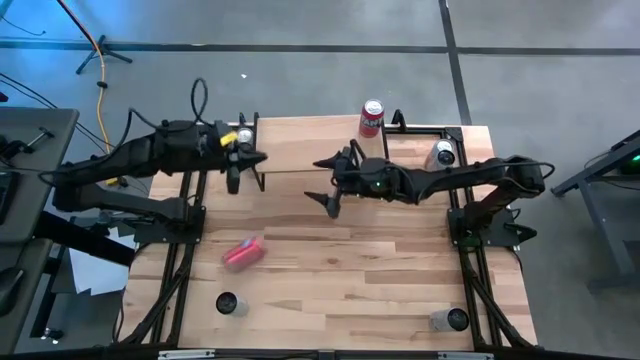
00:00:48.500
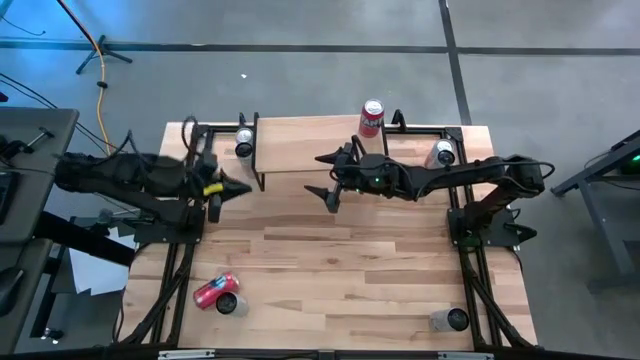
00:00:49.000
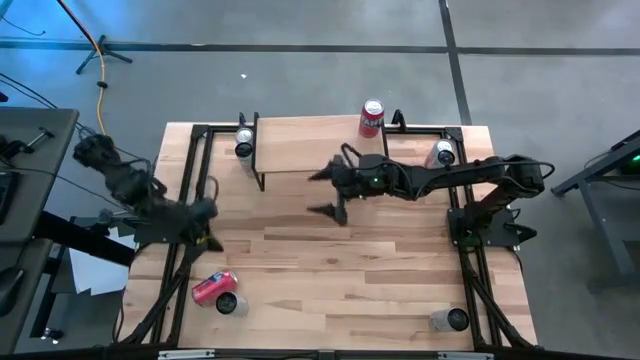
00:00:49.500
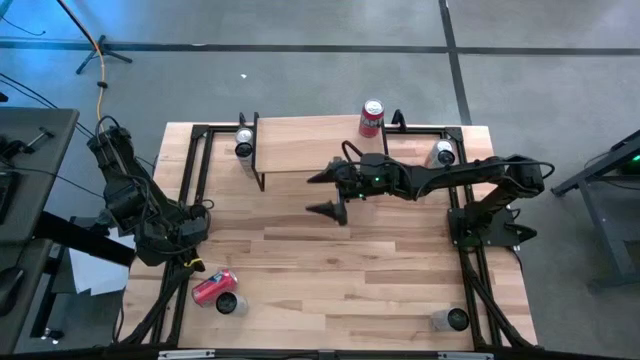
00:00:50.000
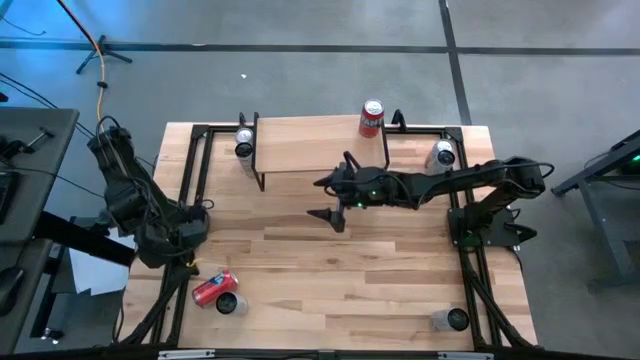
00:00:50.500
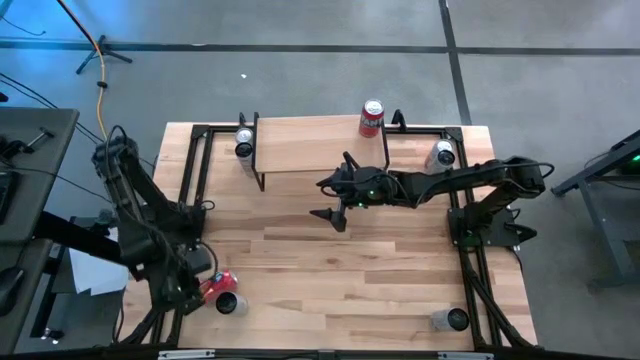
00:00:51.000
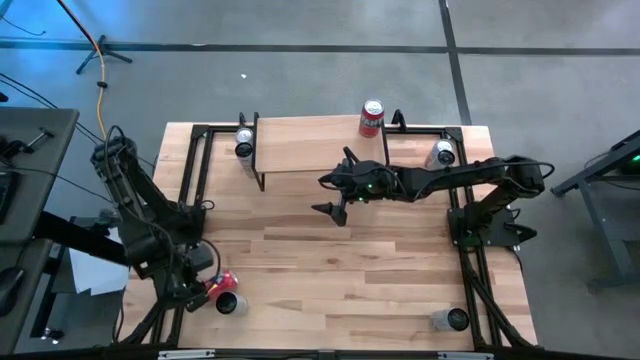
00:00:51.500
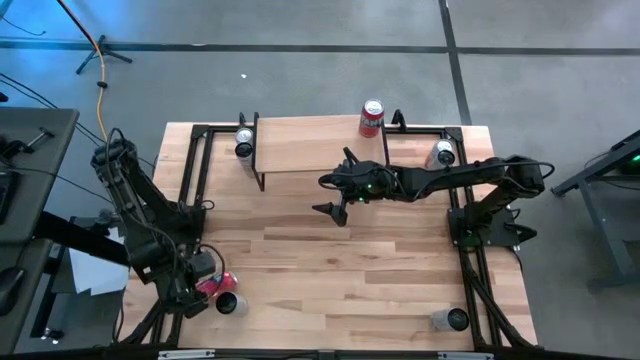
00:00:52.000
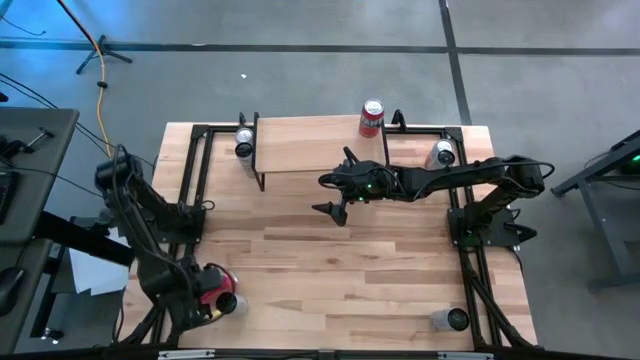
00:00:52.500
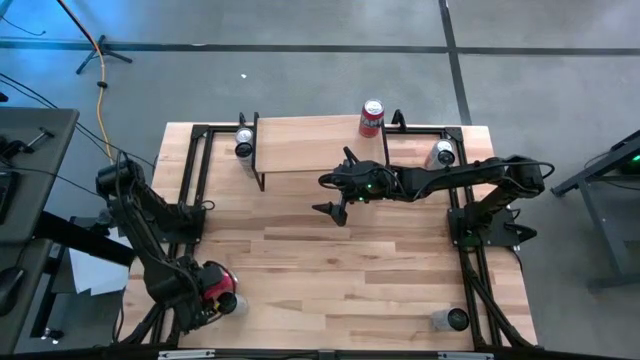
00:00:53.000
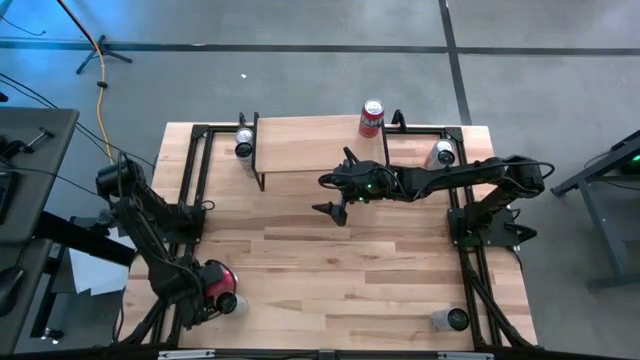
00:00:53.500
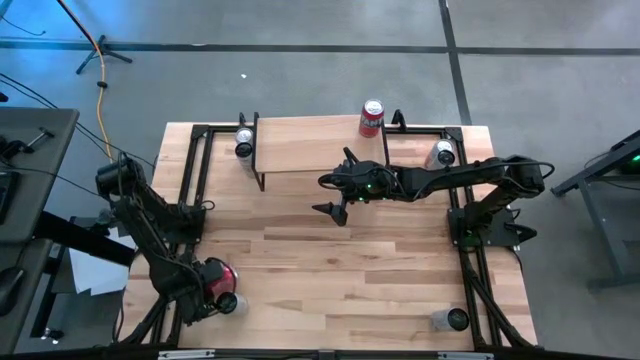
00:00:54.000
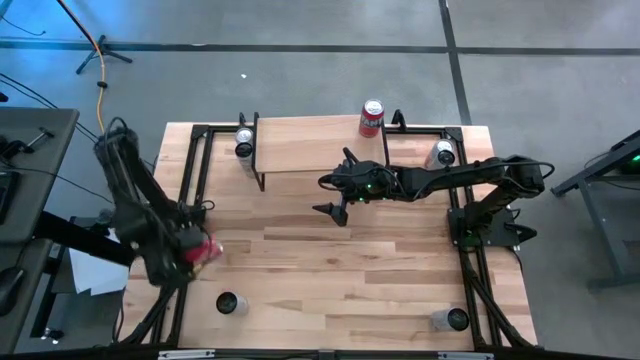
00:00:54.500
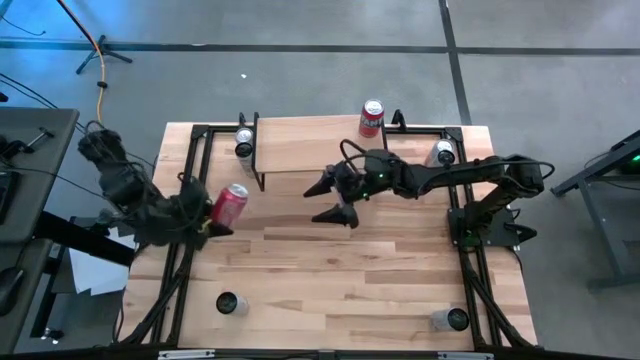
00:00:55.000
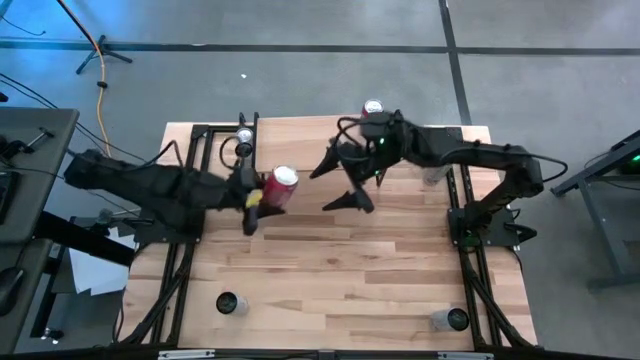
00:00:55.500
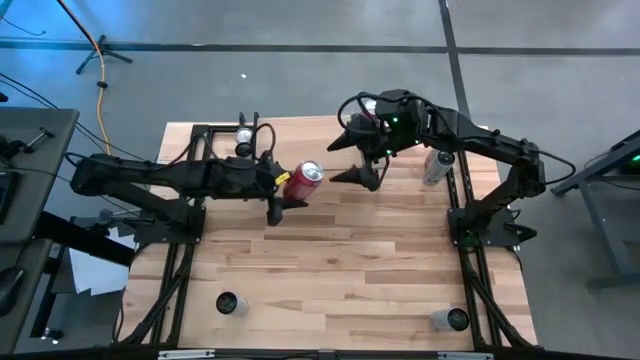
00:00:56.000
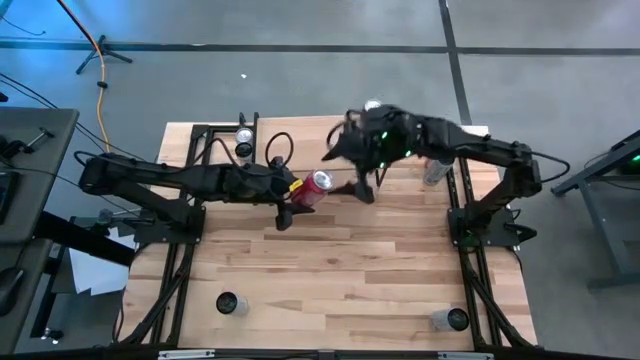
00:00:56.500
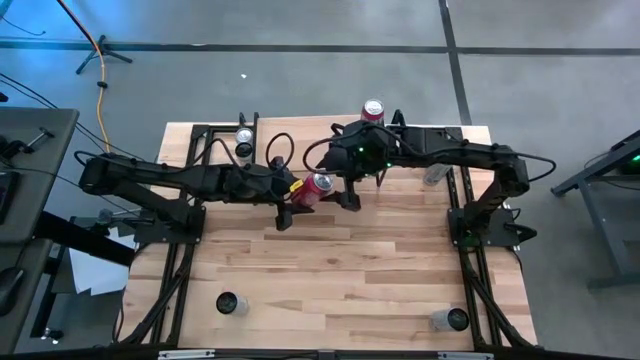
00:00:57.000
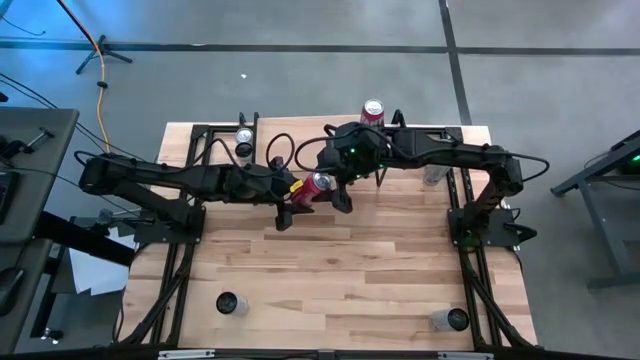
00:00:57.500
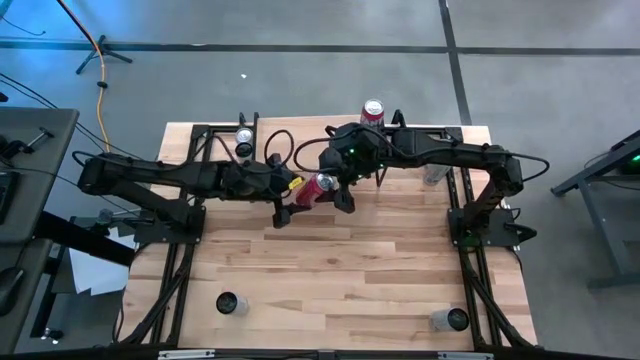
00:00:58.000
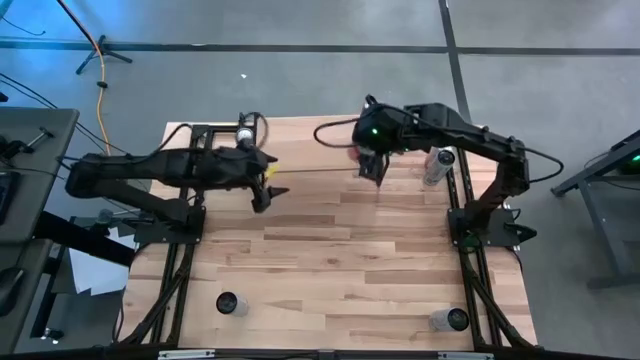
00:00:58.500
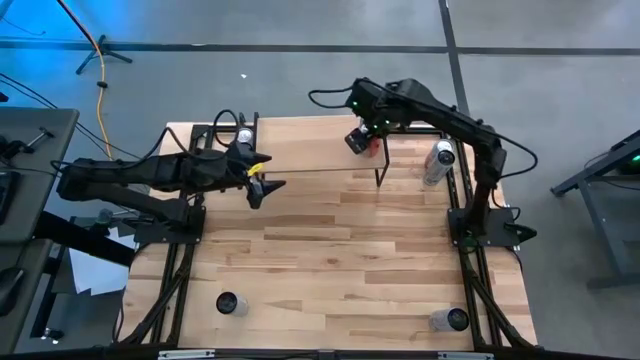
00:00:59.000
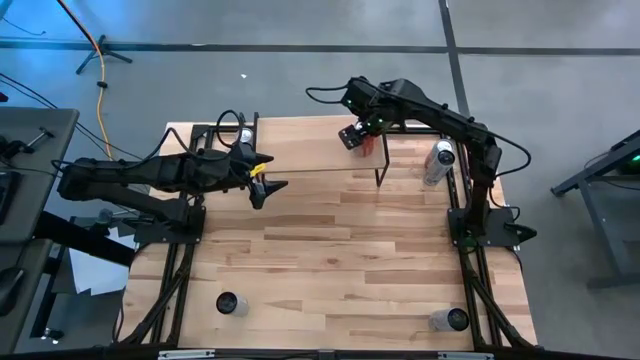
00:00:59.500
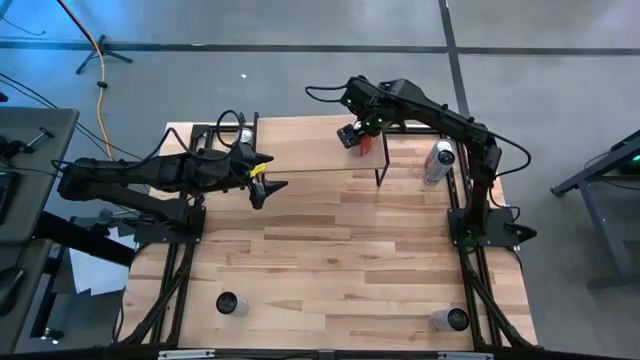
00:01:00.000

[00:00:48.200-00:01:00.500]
Task: Place canned beverage on shelf
Put the orange soda can on the shelf

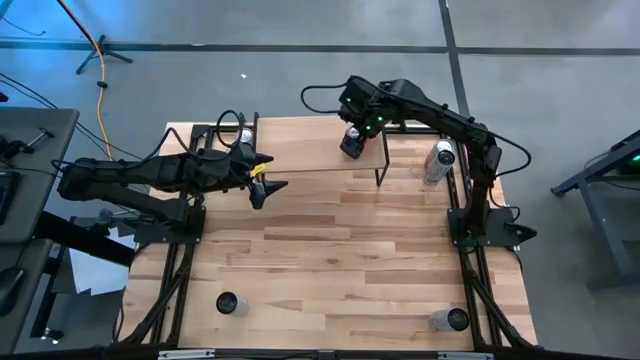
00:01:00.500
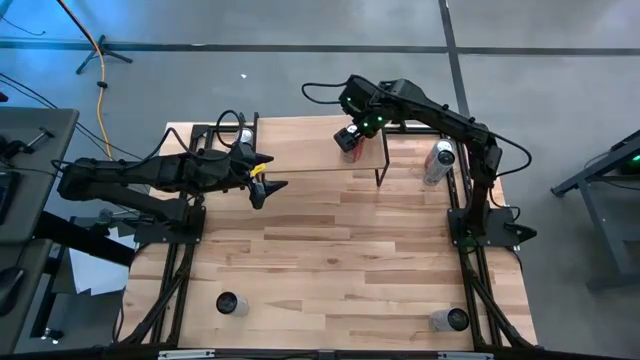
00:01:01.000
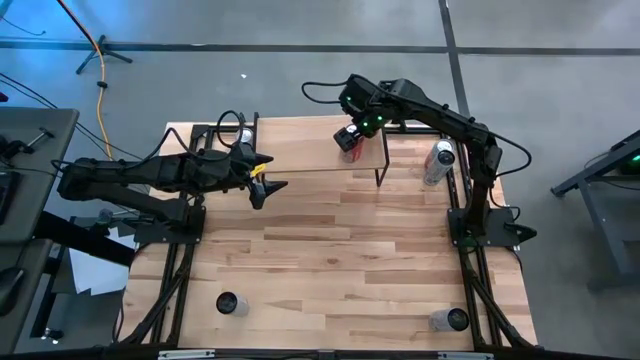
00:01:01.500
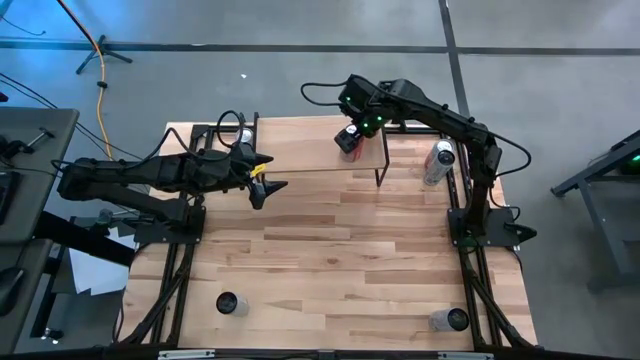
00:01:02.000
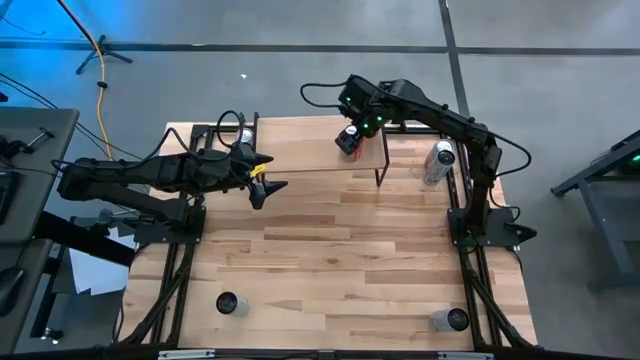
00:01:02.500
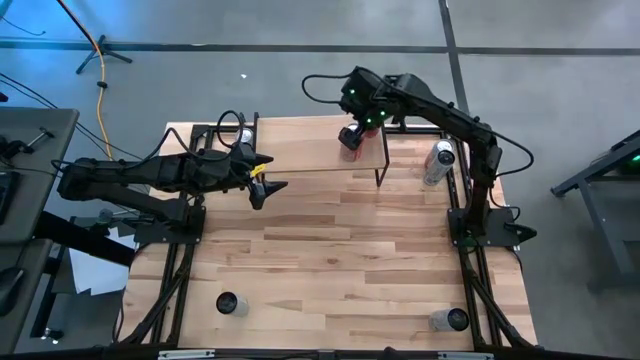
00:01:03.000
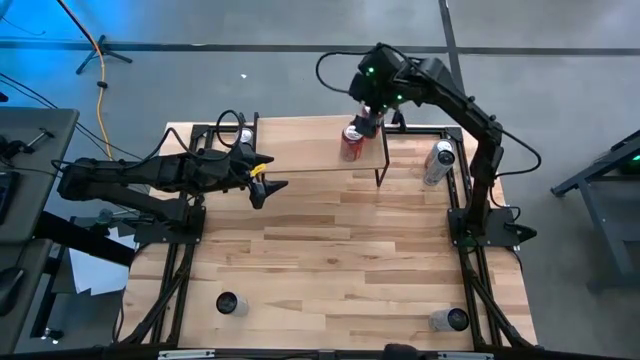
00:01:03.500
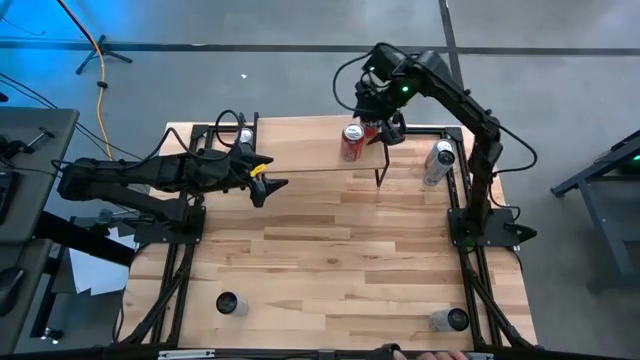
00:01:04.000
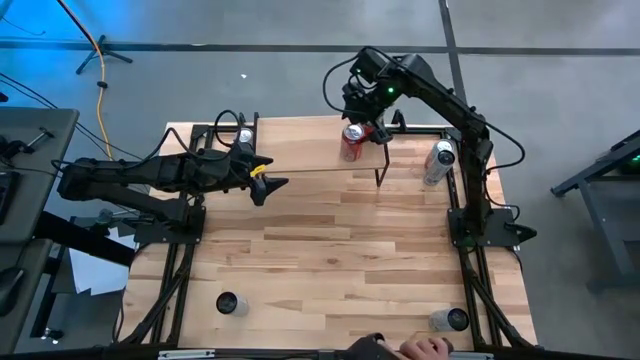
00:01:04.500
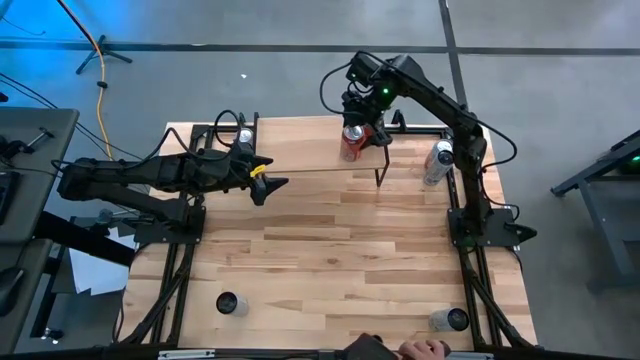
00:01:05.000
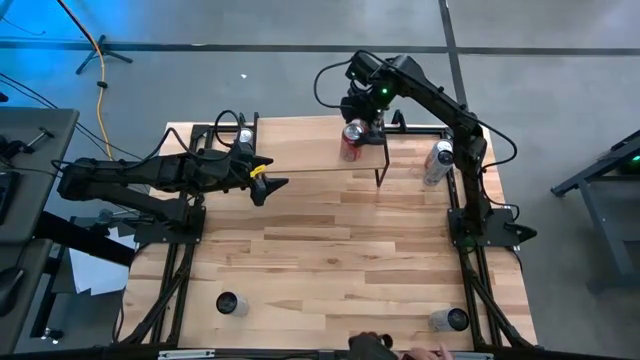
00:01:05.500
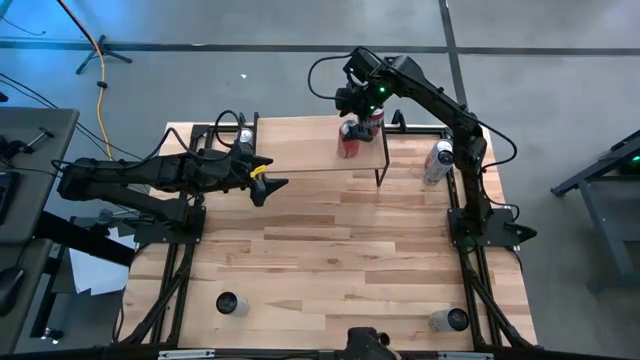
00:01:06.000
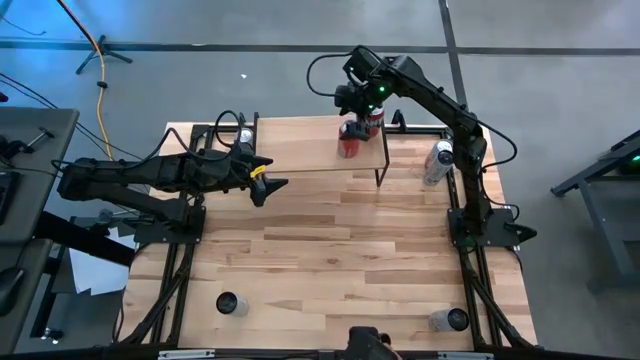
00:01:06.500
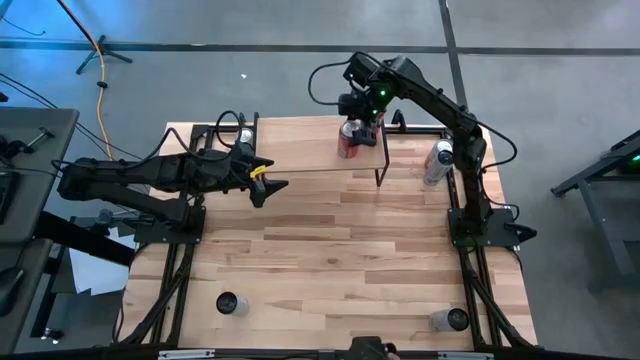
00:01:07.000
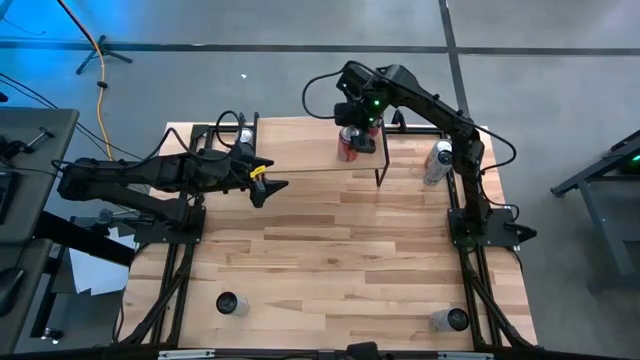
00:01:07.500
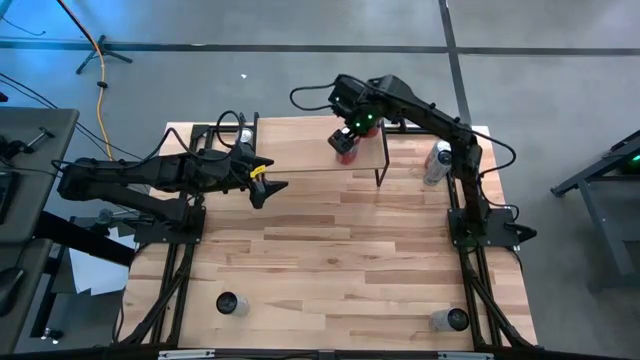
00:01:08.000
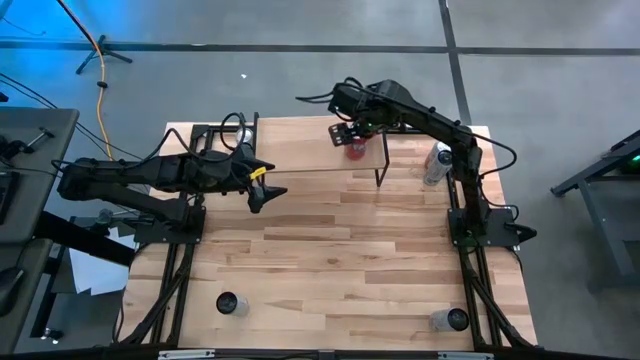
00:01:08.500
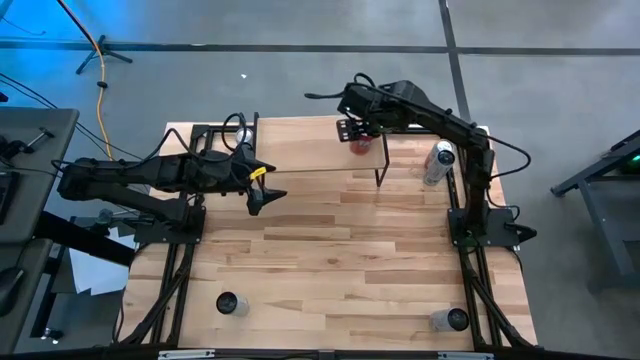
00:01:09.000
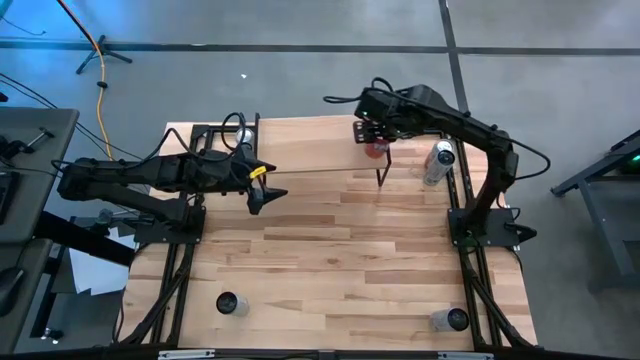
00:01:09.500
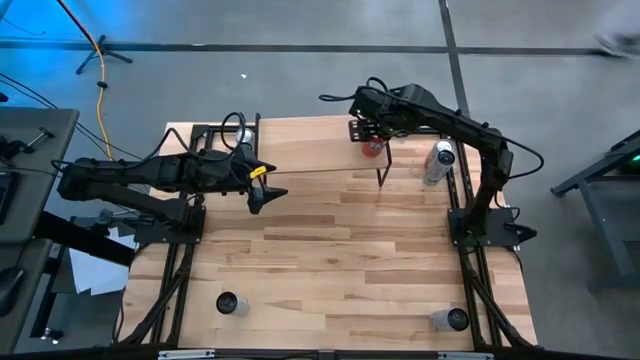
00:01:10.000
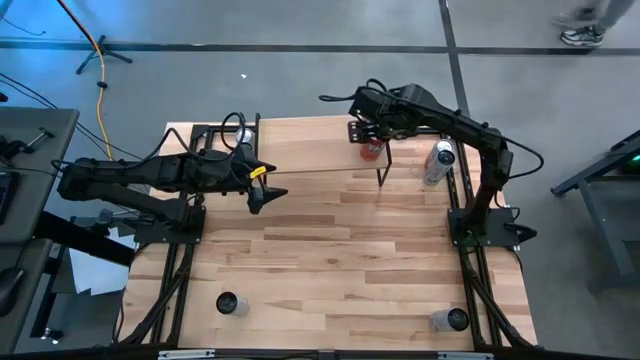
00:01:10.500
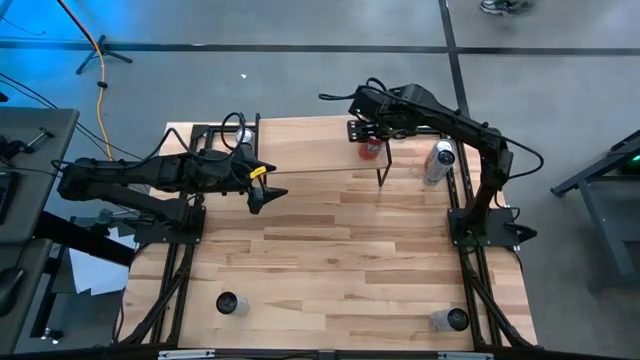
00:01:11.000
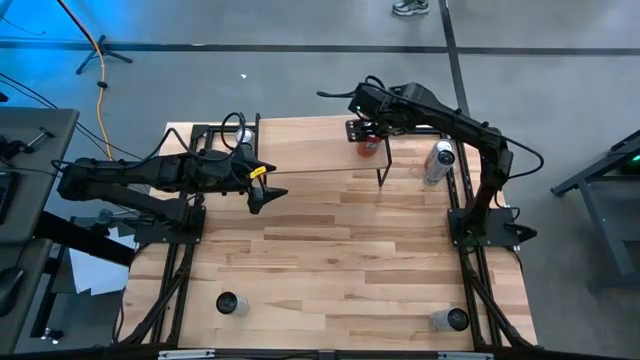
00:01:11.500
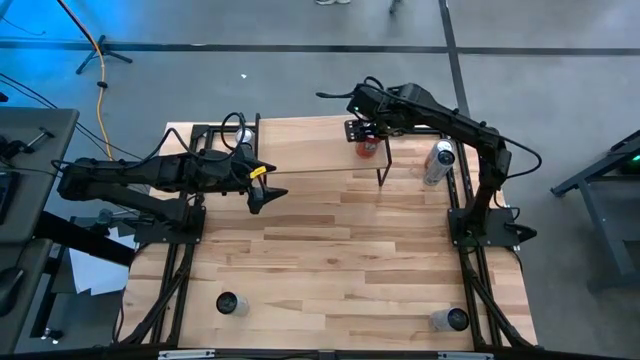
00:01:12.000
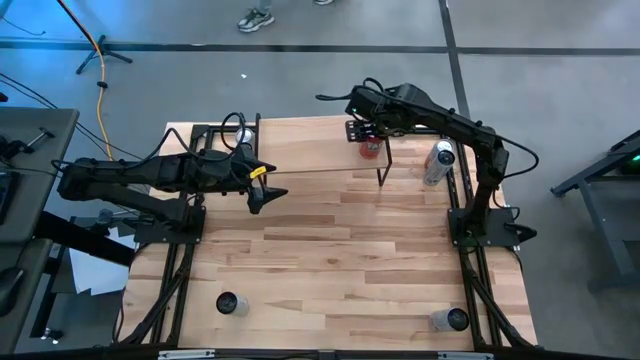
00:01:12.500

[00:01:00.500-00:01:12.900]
Put the orange soda can on the shelf
